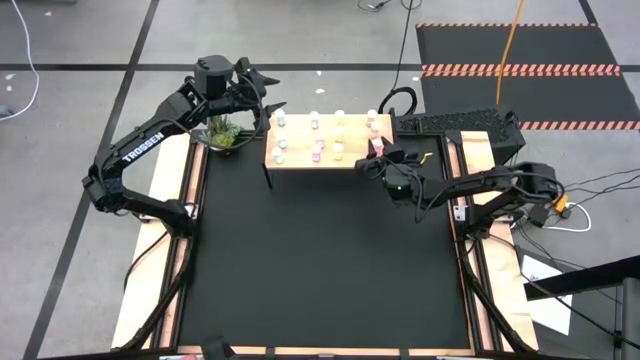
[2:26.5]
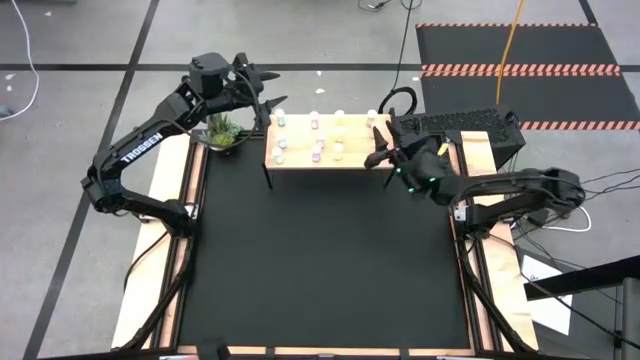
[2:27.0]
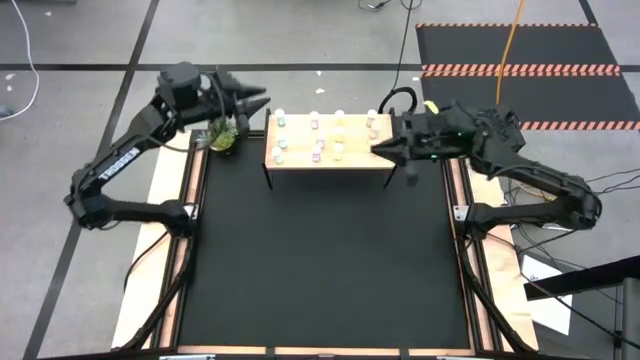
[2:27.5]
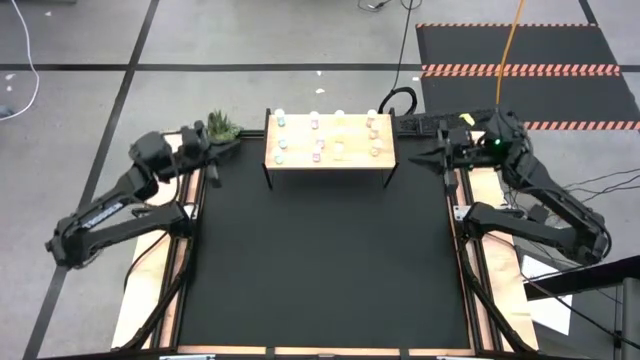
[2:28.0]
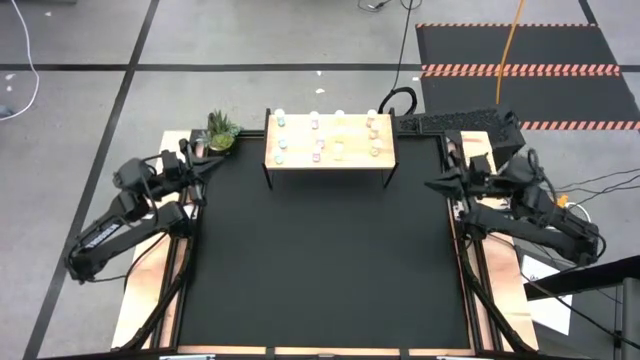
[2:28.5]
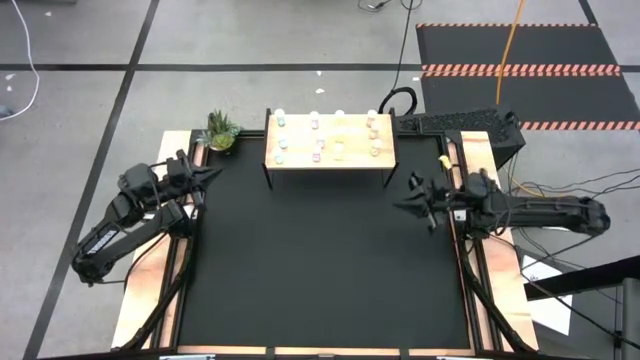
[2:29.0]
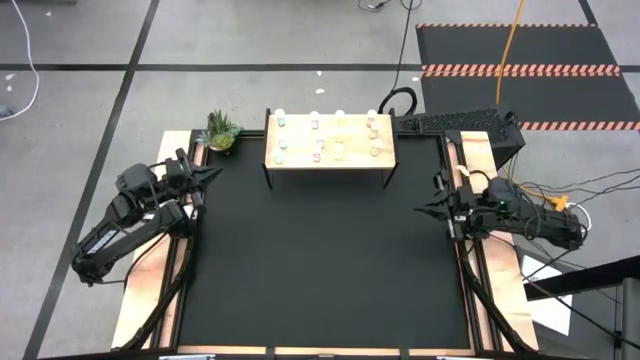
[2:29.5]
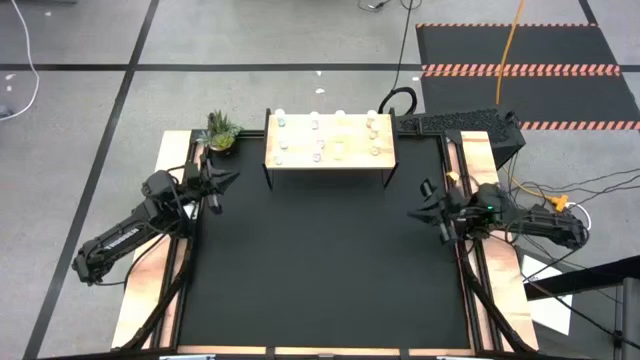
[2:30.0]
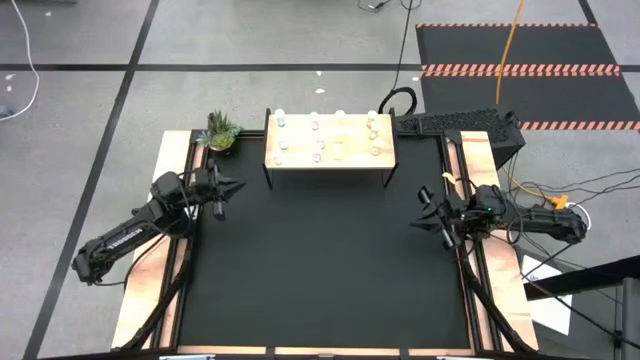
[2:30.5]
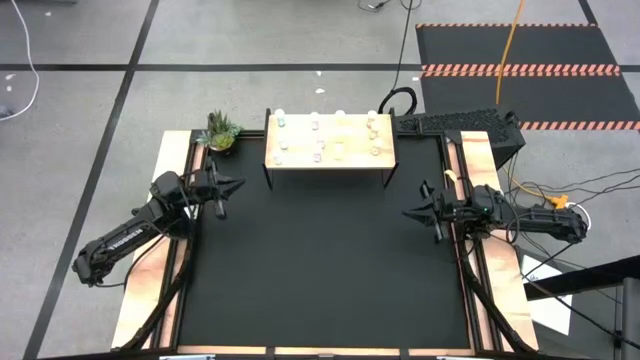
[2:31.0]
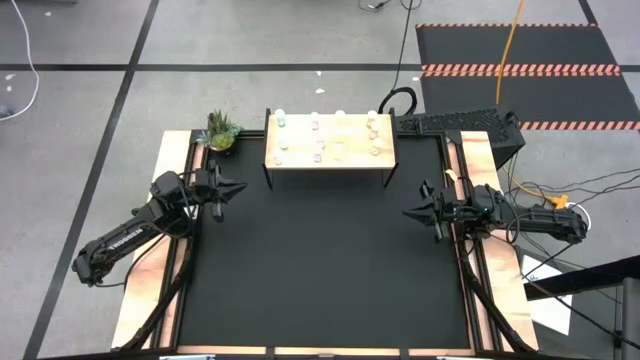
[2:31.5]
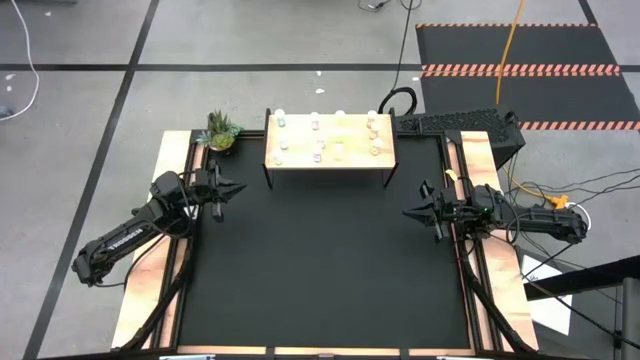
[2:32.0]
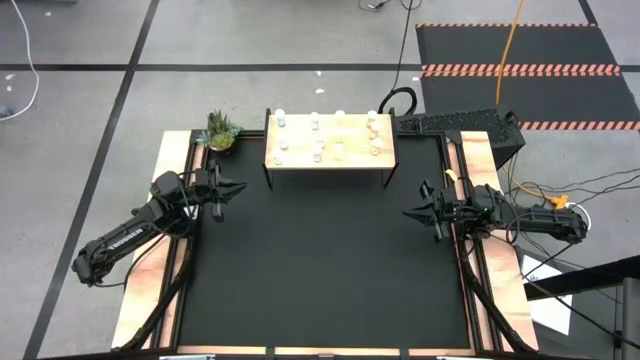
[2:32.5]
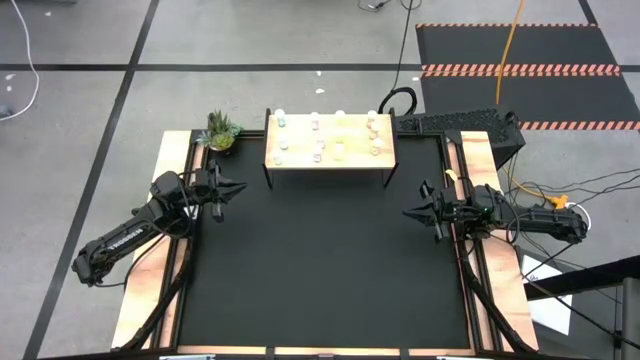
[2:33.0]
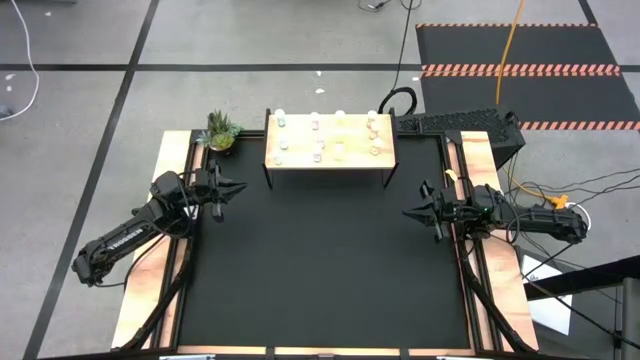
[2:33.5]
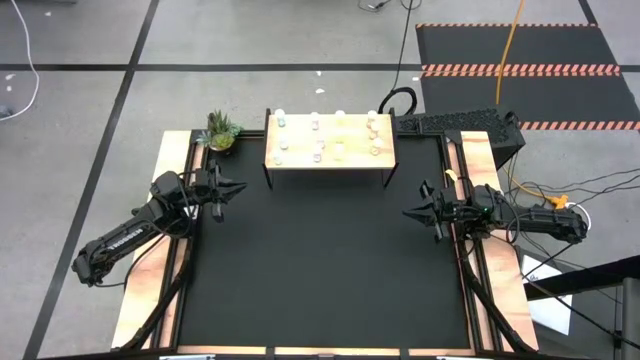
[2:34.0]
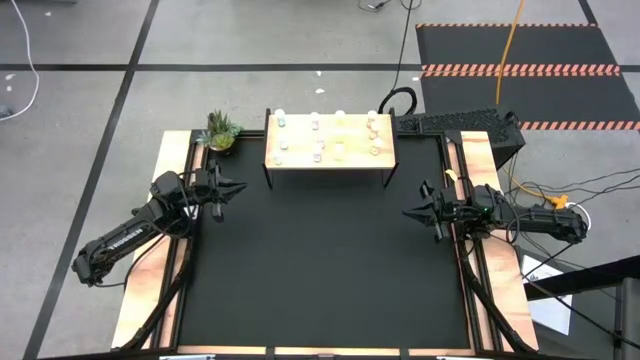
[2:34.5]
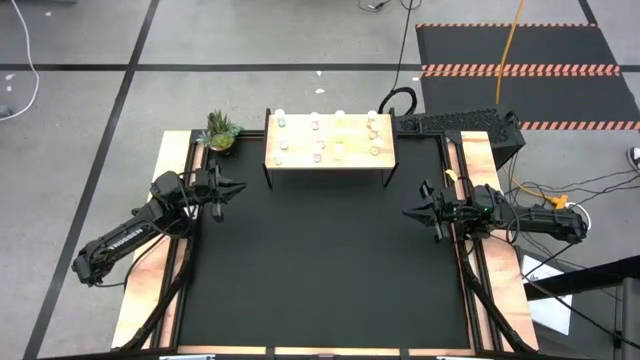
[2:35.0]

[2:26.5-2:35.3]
Task: Pick and place medicine bottles onto shelf by color
Return to Home Position

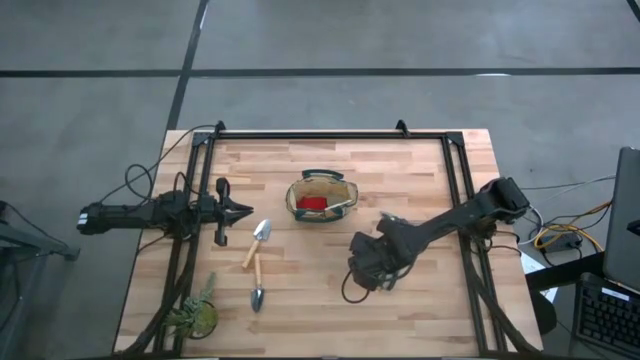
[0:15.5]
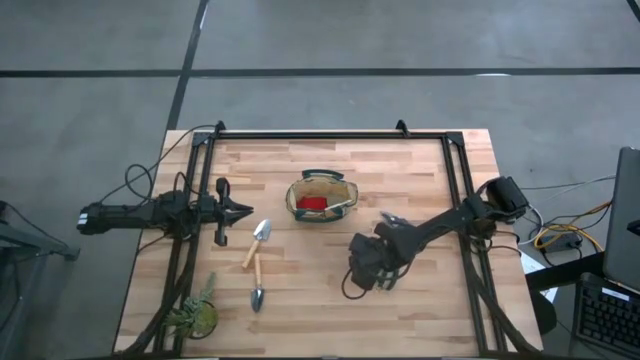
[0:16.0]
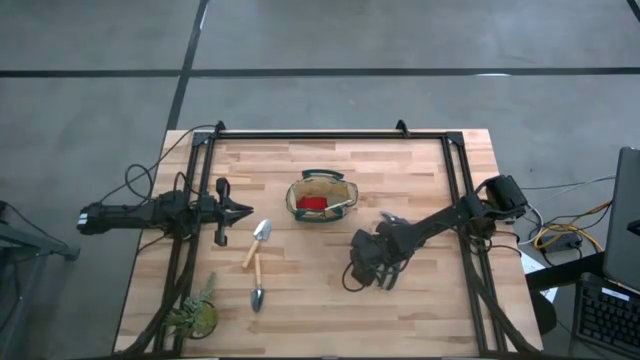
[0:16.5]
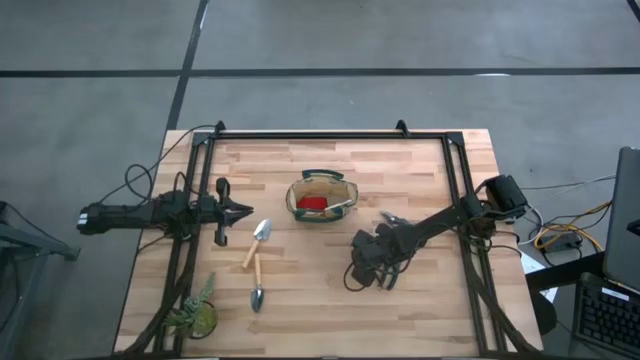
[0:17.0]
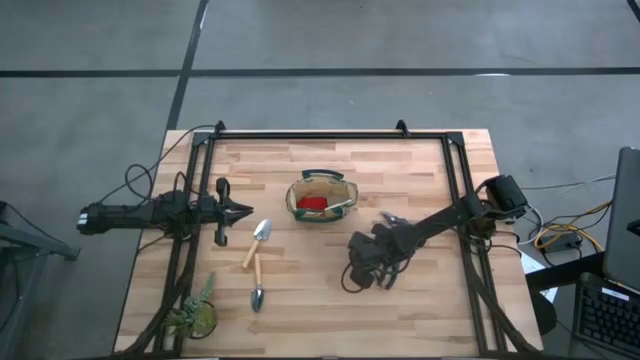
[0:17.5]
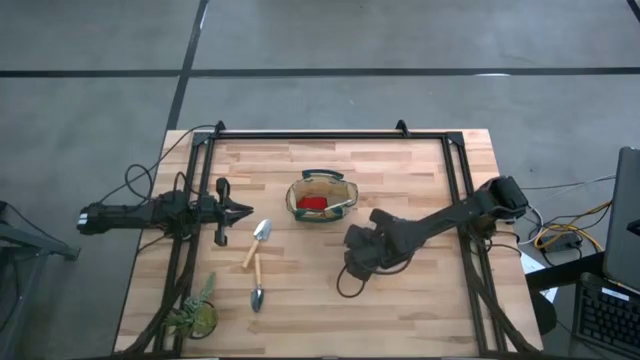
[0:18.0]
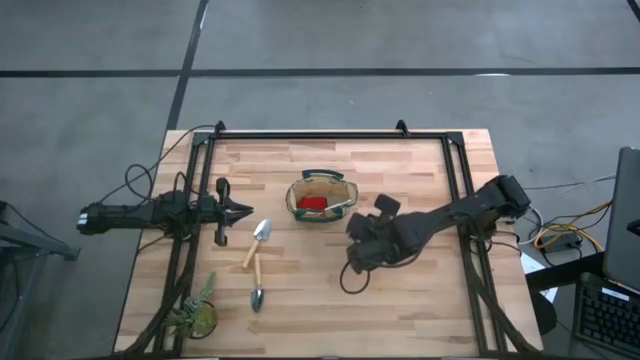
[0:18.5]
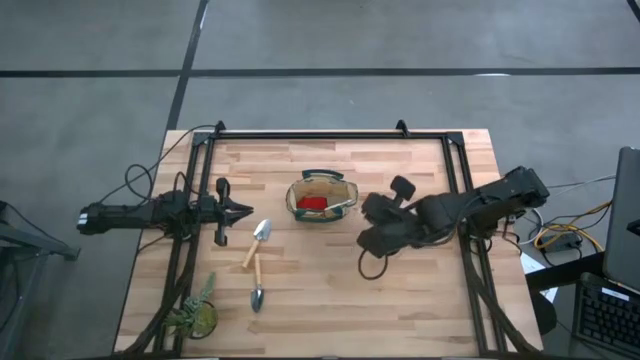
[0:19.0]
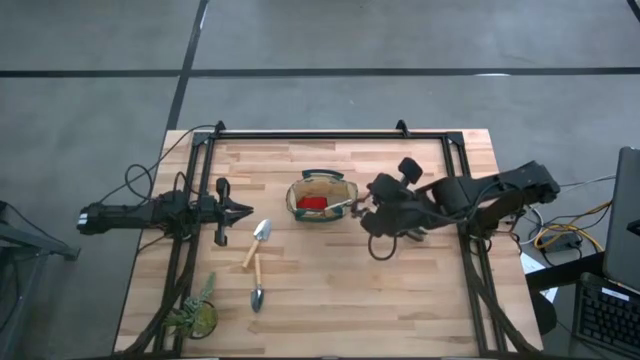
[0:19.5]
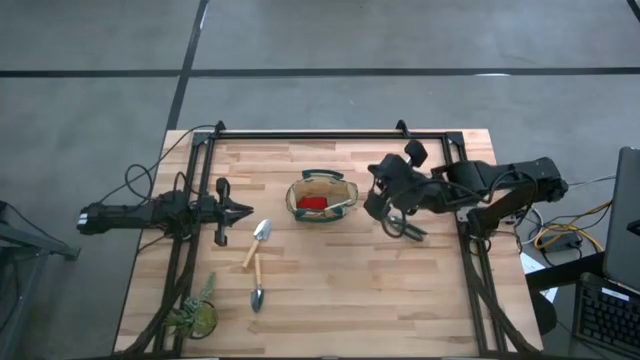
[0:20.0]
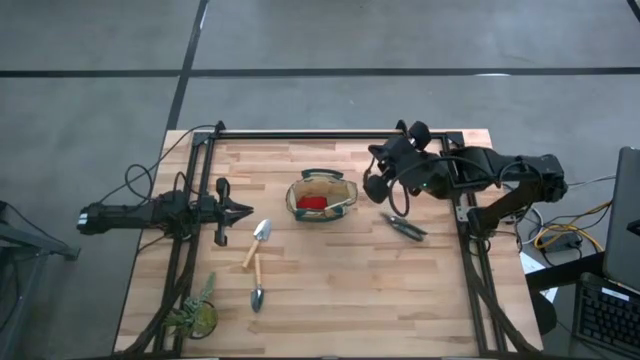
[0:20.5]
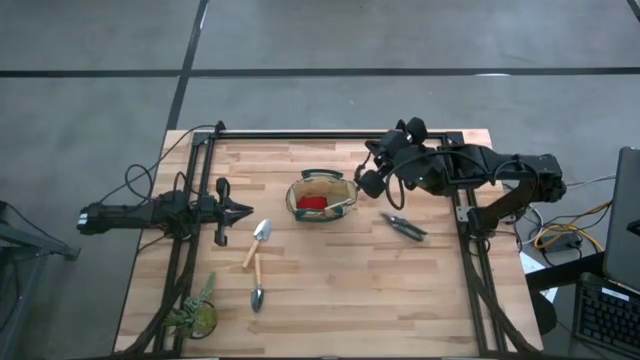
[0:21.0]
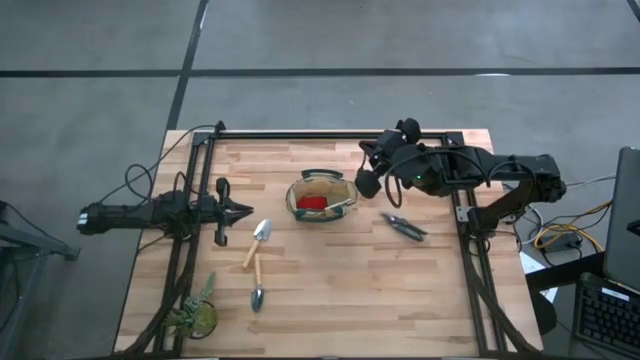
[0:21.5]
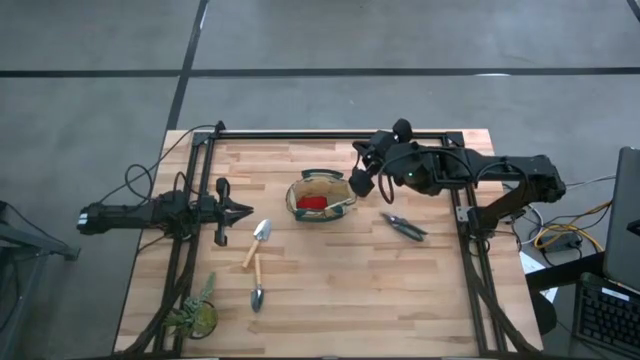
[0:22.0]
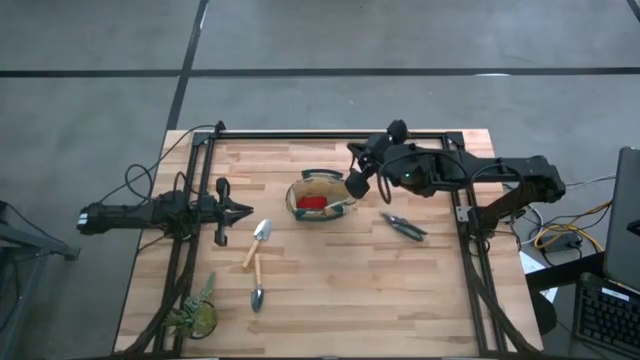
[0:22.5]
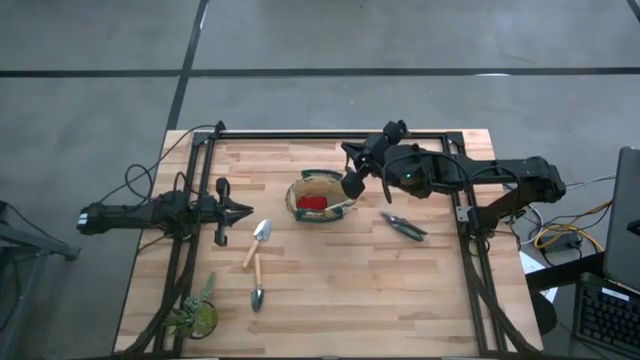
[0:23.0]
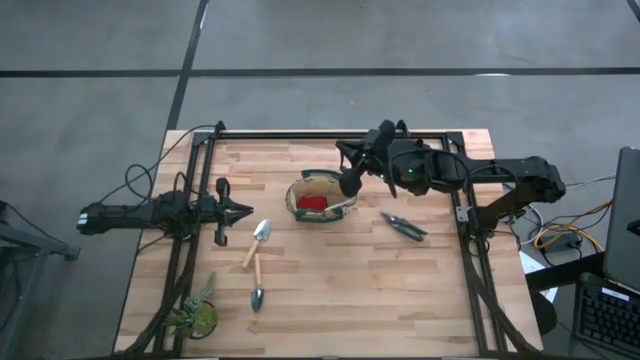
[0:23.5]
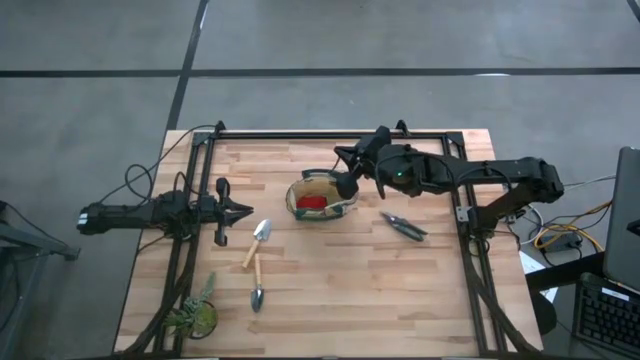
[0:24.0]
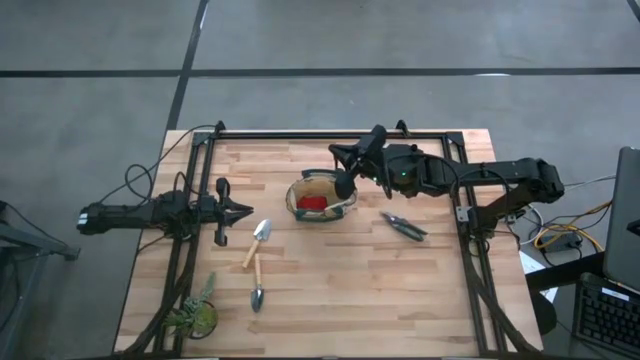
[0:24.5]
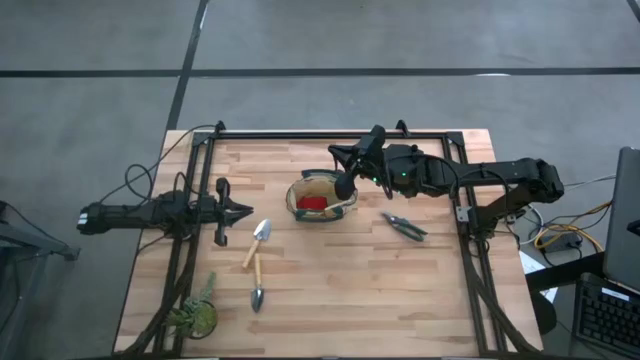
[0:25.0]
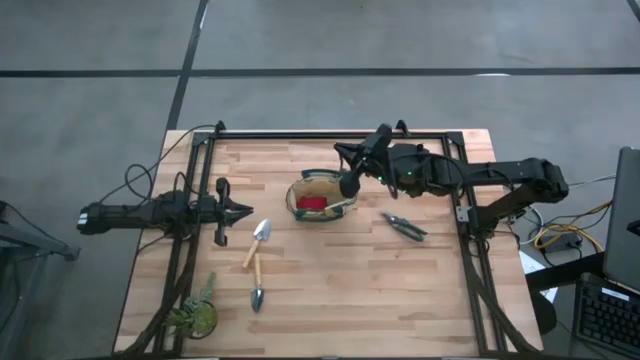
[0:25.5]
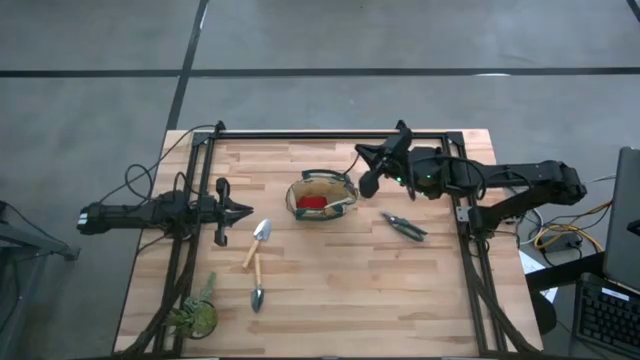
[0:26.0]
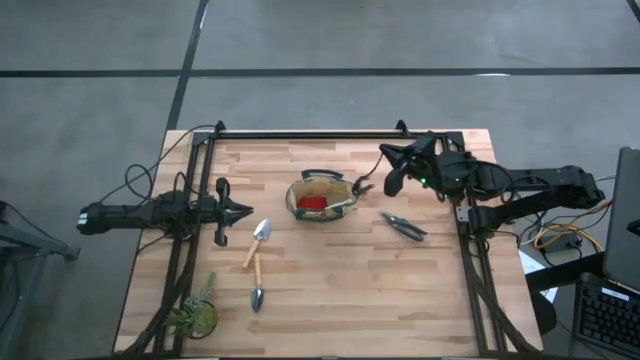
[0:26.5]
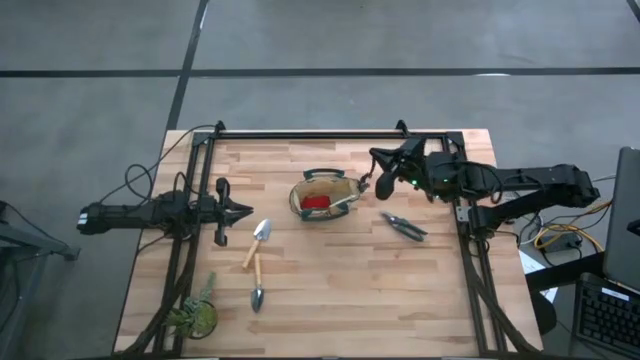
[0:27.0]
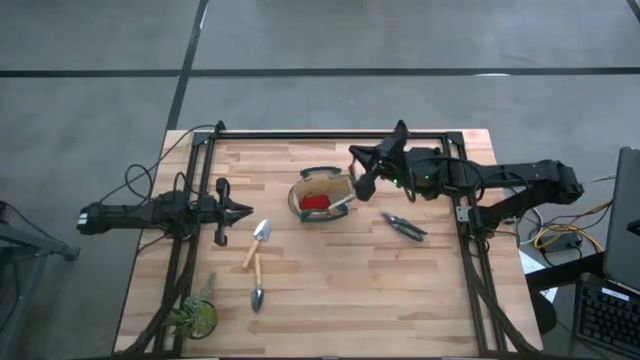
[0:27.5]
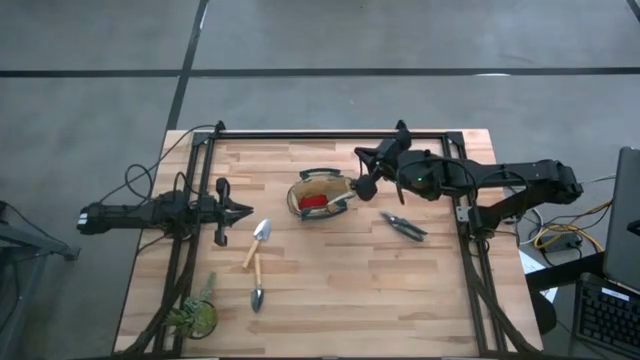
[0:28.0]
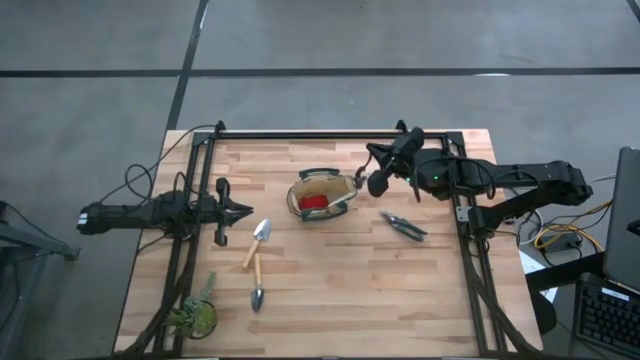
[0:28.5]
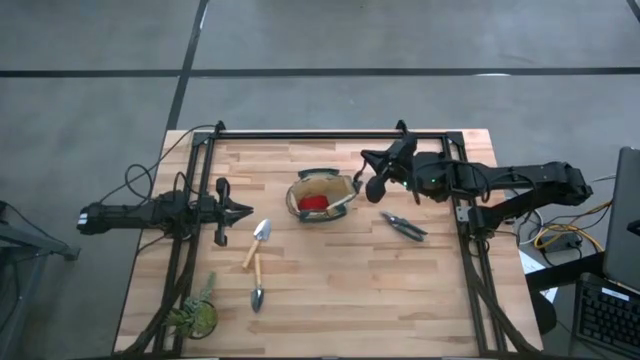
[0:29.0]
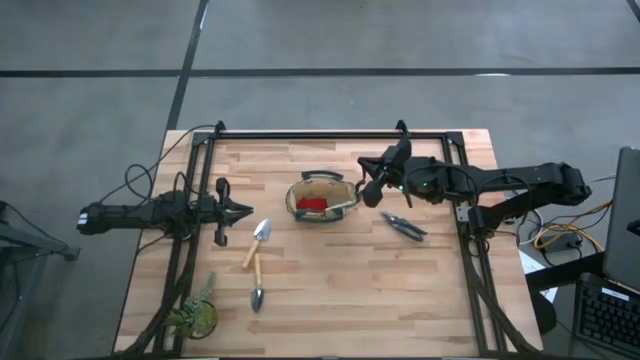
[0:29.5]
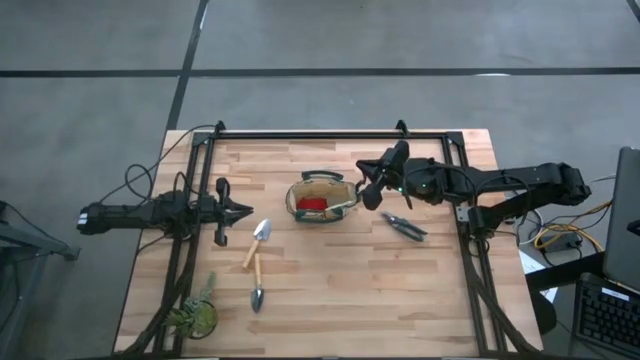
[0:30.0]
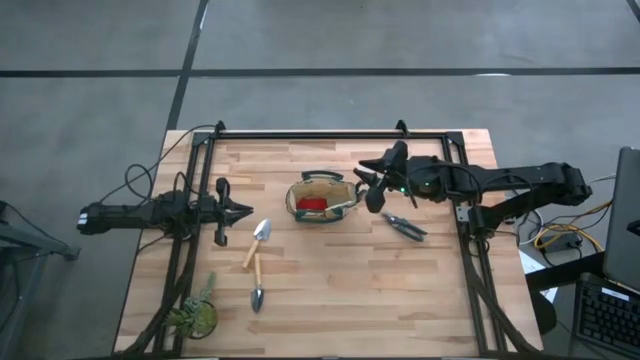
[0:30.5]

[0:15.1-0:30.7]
Task: Pick & Place Garden tools in Gardening bag
Put the bottom green shear scissors into the light brown gardening bag
